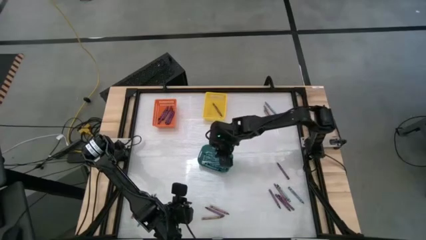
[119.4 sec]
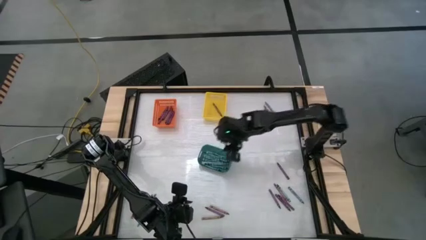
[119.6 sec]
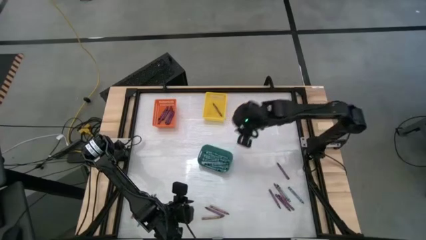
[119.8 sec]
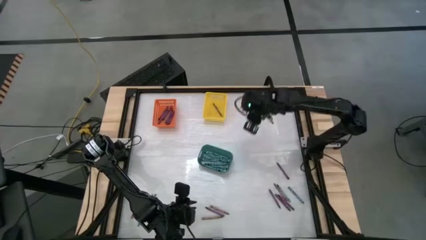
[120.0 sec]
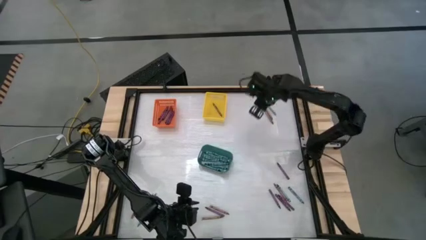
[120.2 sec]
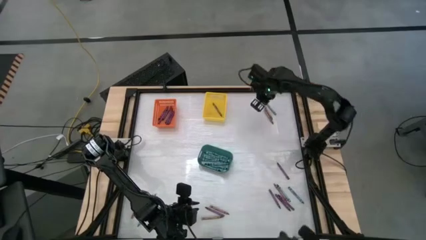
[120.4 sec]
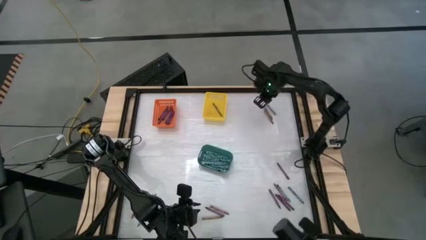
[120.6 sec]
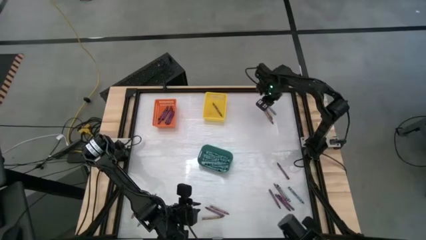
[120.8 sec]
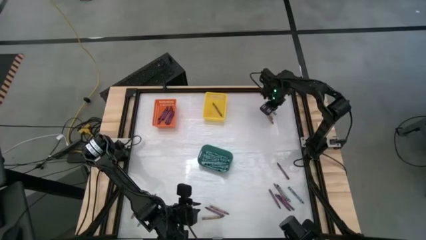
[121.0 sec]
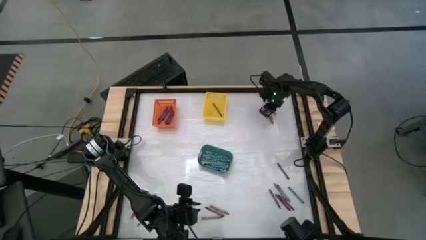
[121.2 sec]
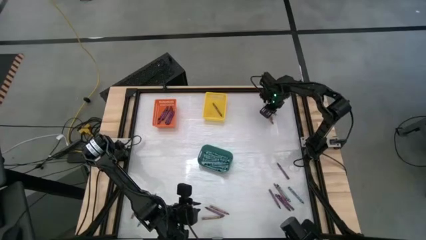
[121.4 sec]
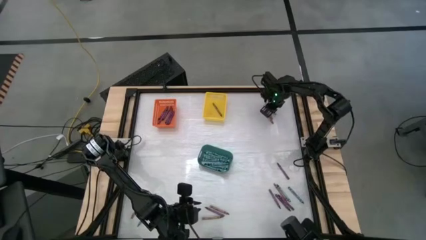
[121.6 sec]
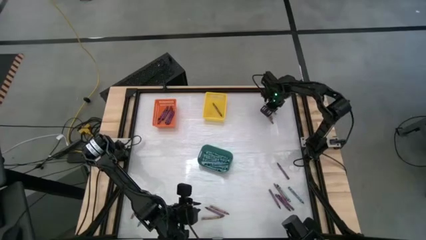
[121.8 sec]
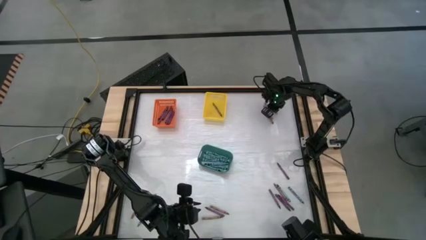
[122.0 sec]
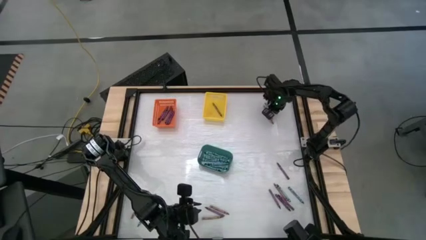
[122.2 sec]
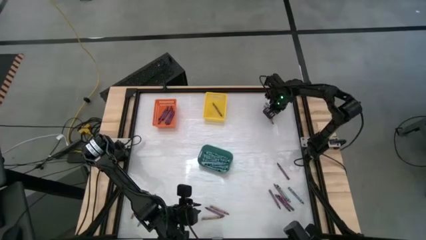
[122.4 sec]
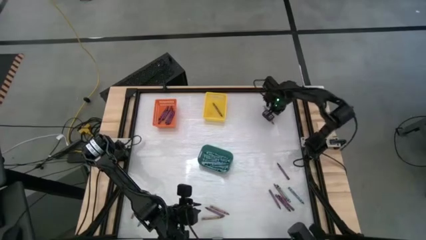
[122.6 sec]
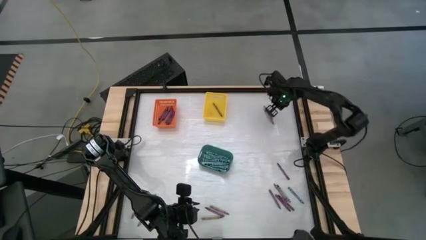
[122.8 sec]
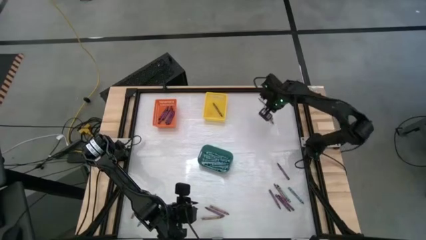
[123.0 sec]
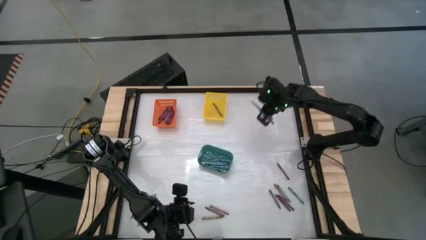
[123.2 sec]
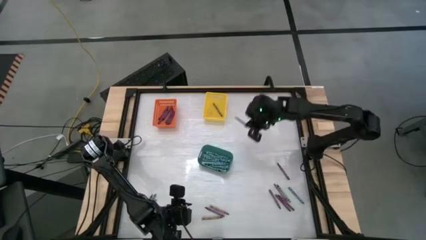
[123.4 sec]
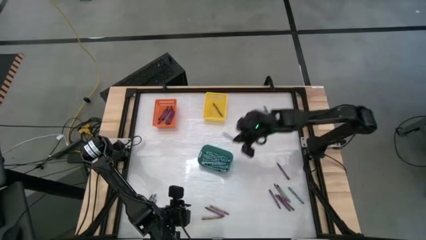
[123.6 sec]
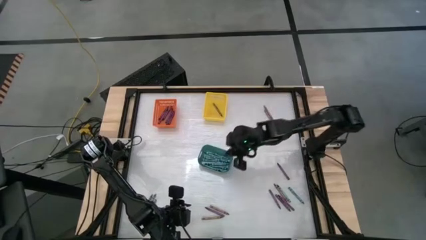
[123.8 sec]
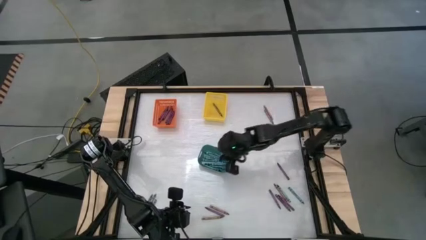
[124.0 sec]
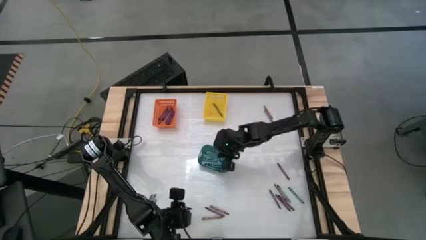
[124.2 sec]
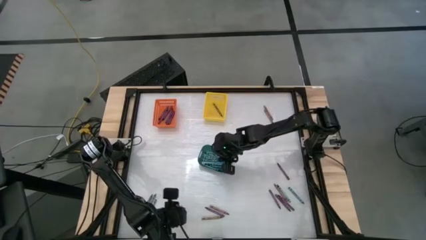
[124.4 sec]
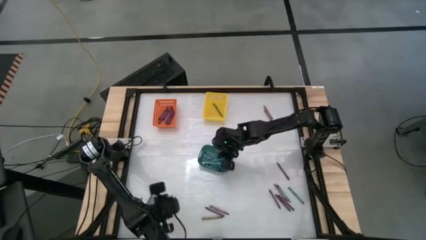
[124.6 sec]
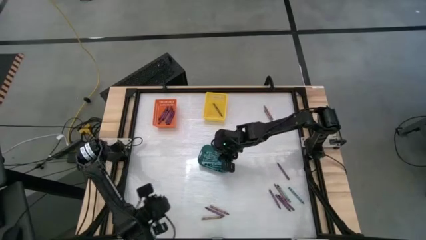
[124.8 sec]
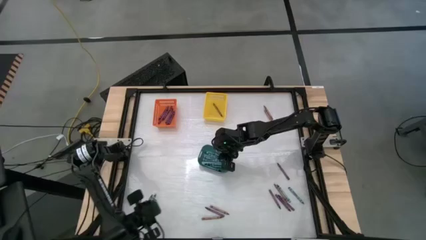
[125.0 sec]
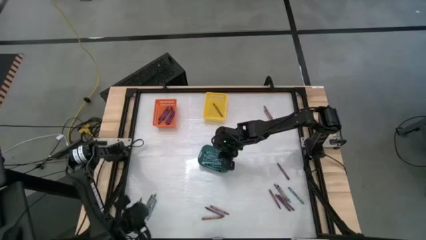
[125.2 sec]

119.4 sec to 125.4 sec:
Task: Sort crayons
Put the blue crayon into the blue bin

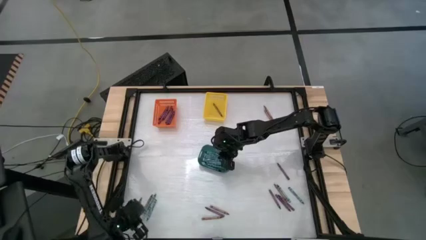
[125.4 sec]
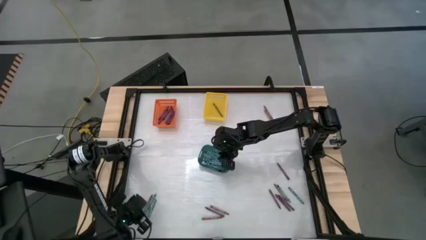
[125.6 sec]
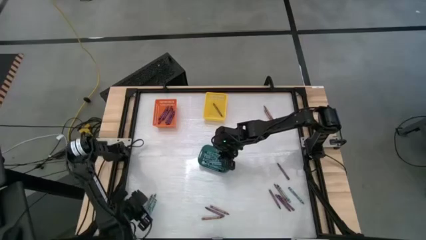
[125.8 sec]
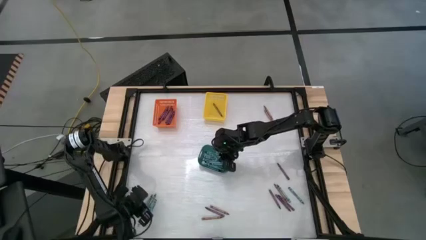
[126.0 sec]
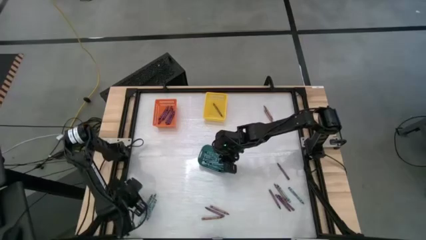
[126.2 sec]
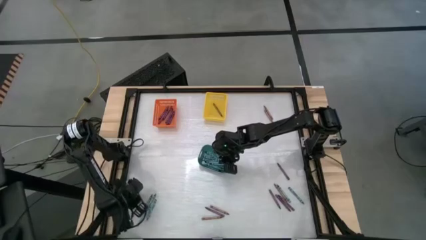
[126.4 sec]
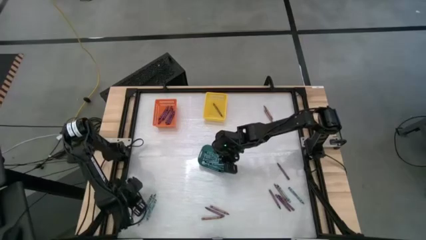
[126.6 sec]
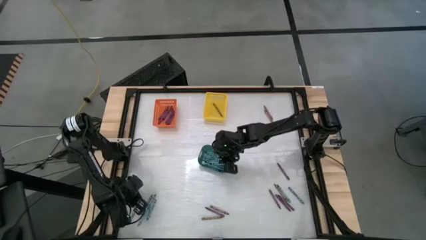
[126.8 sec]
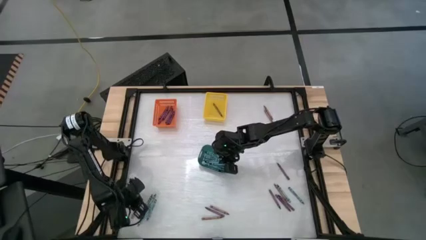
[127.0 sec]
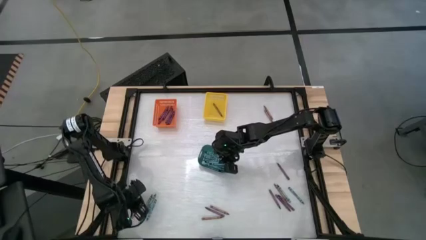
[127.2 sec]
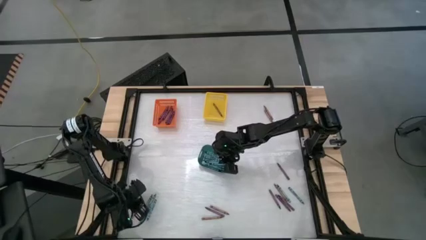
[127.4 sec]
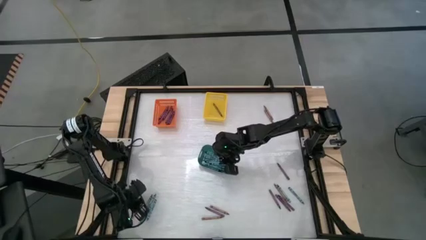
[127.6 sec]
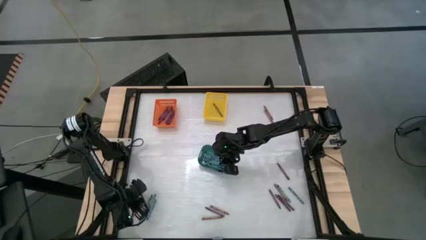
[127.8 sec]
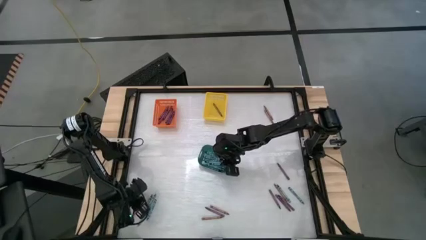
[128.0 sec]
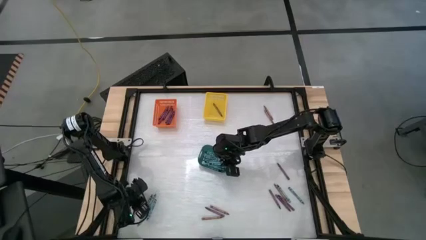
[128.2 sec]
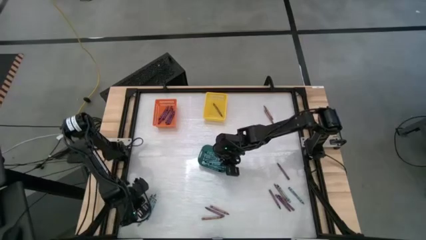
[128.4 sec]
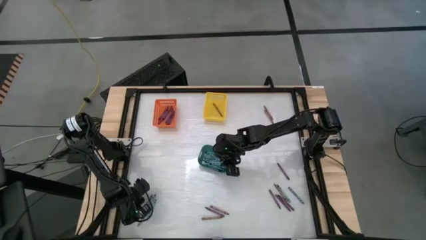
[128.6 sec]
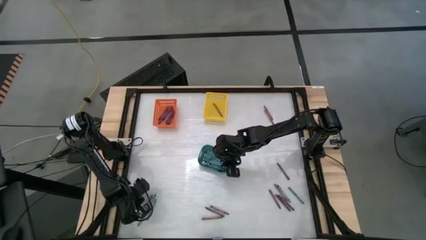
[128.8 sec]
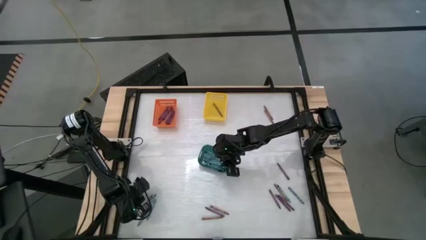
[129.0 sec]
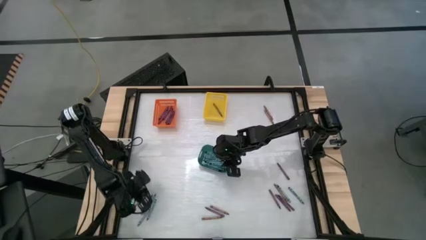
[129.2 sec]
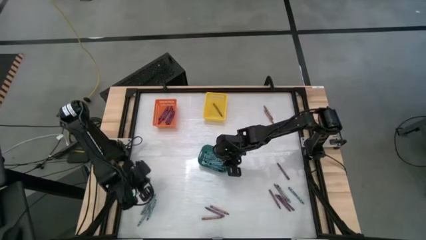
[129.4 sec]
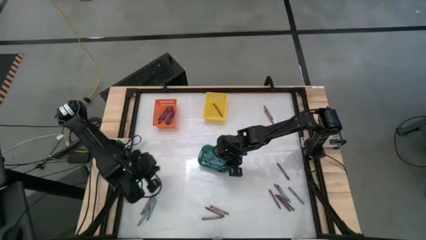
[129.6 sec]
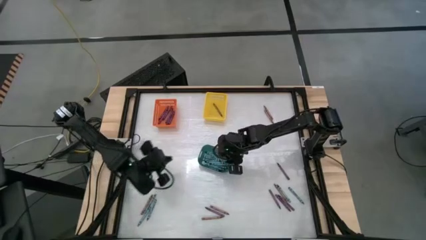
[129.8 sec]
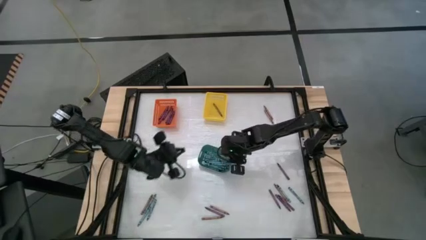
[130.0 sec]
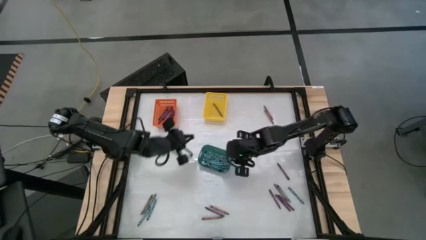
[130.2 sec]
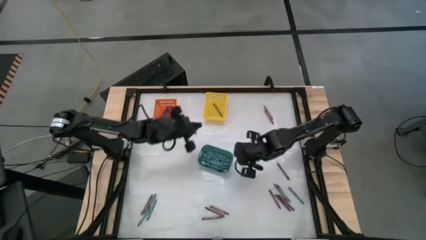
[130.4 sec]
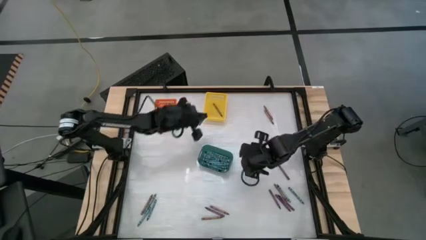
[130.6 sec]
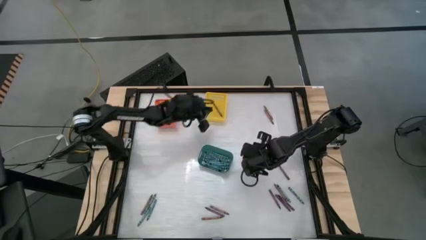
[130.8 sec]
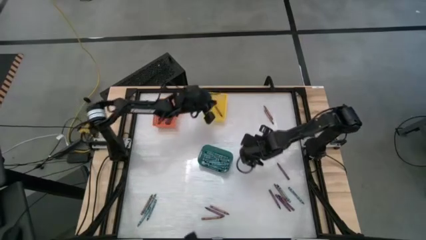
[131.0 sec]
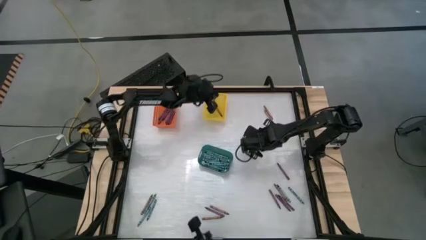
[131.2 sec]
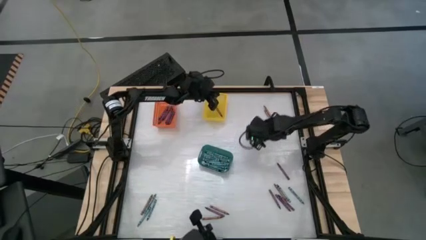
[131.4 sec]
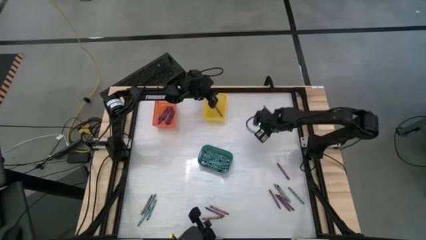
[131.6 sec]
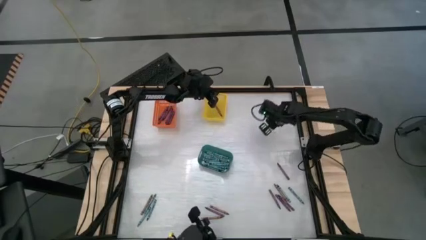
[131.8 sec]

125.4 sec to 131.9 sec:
Put the brown crayon into the yellow bin

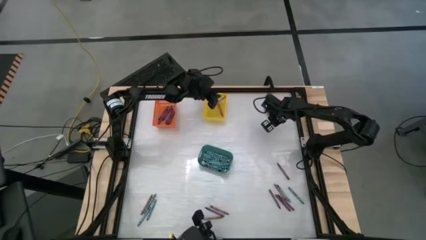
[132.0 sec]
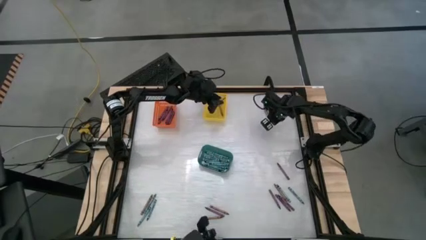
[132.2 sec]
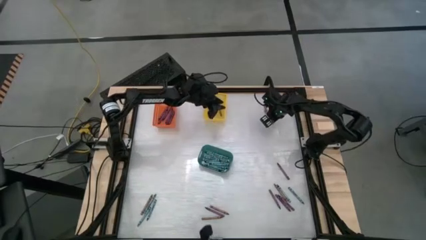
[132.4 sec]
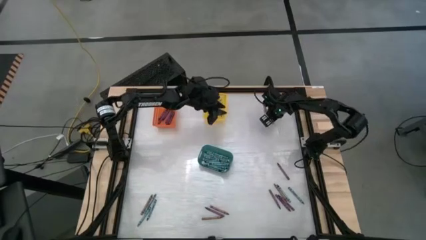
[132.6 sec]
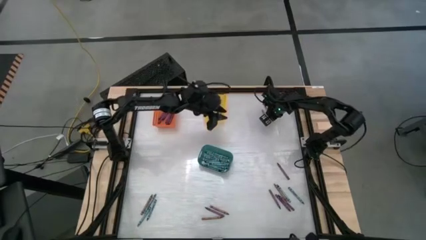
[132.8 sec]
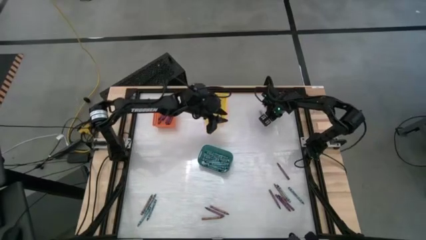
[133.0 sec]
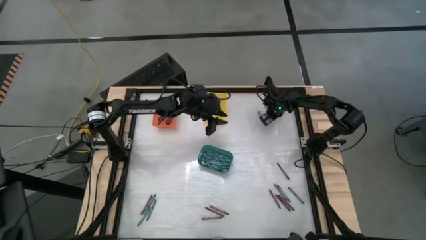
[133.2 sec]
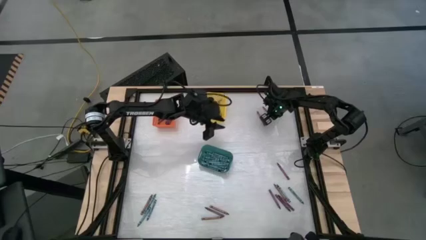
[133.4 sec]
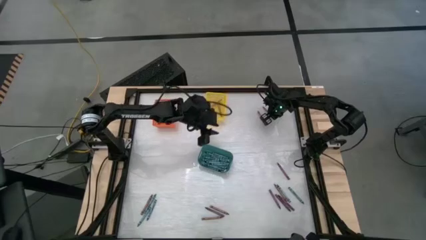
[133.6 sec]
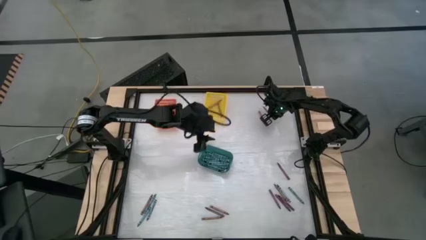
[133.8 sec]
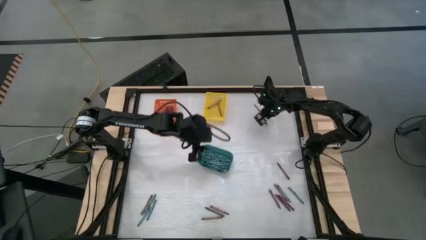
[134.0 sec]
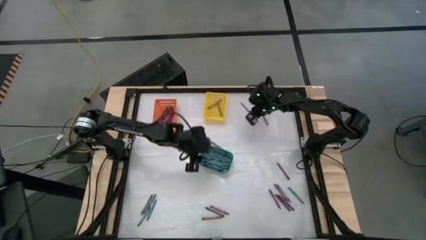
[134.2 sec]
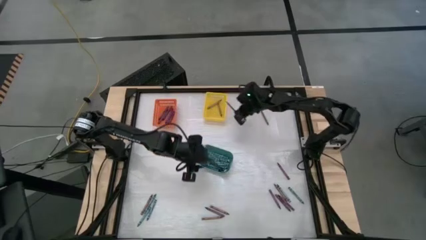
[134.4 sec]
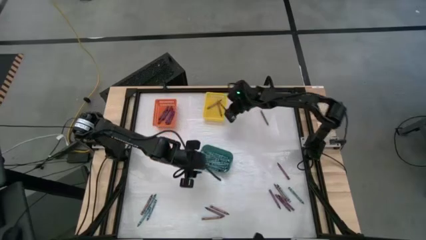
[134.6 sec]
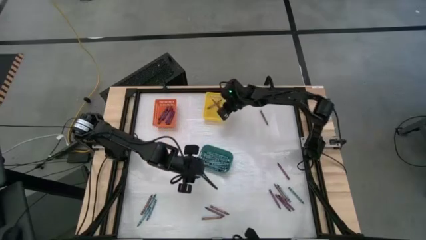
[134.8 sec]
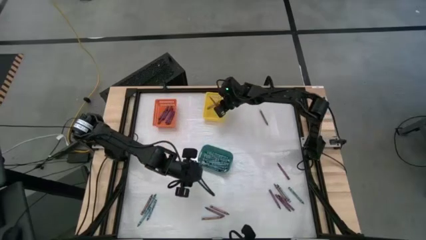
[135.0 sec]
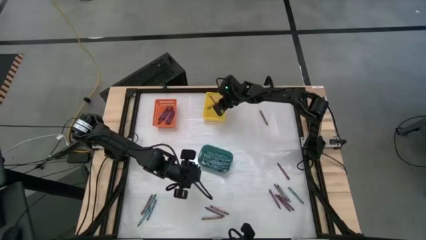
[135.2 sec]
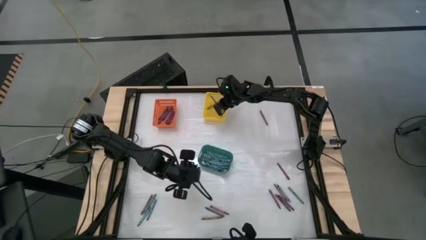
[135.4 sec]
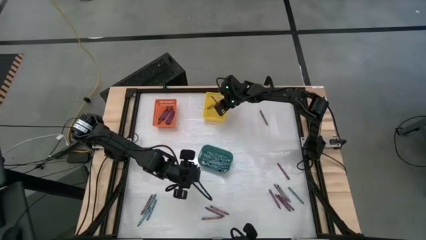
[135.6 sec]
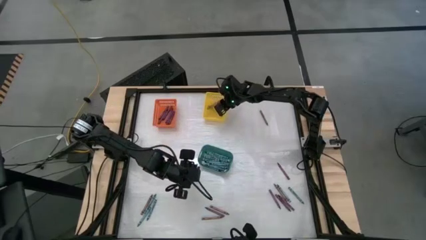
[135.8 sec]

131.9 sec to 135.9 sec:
Put the brown crayon into the yellow bin
